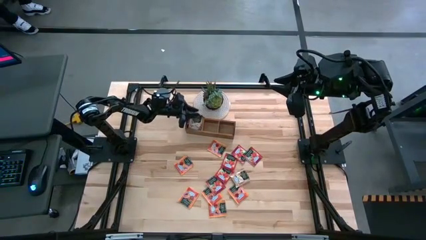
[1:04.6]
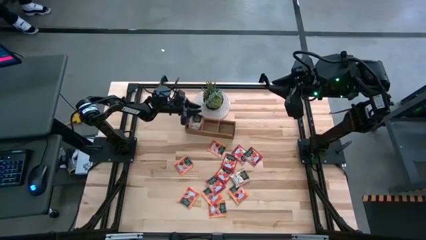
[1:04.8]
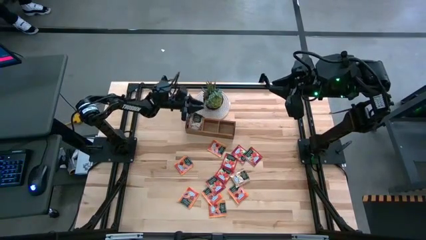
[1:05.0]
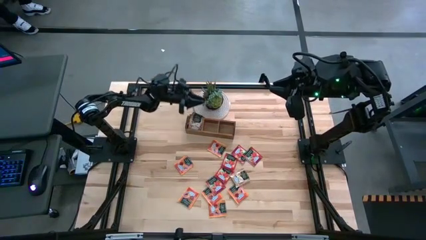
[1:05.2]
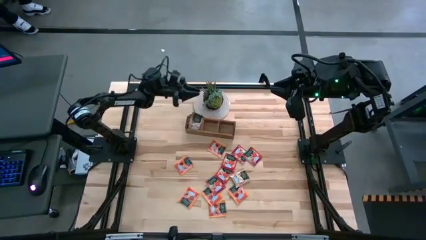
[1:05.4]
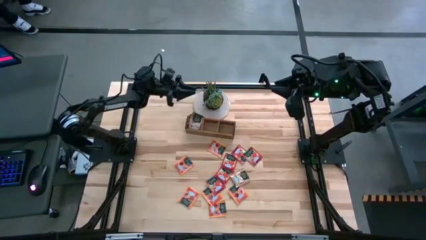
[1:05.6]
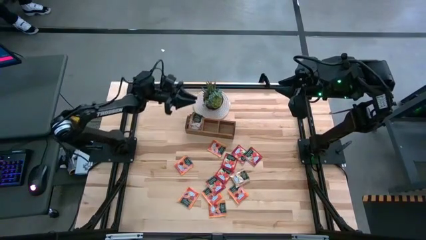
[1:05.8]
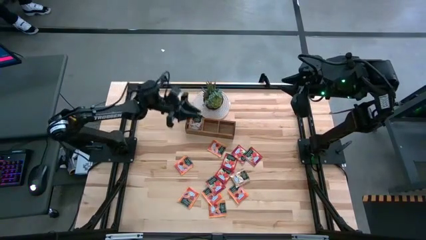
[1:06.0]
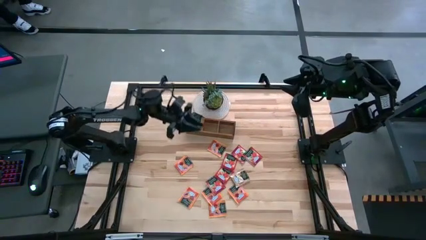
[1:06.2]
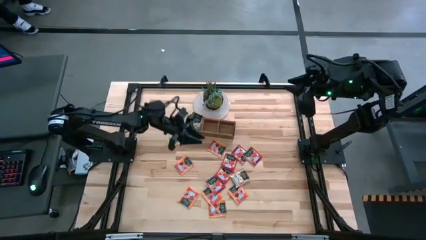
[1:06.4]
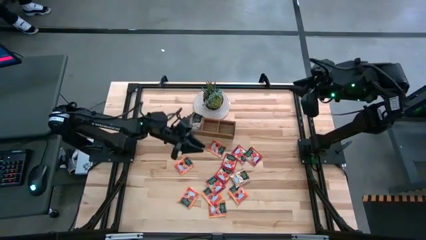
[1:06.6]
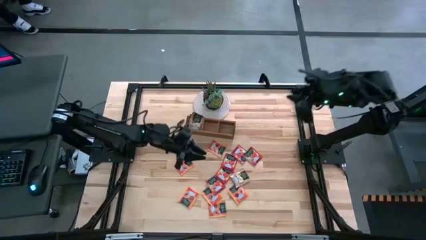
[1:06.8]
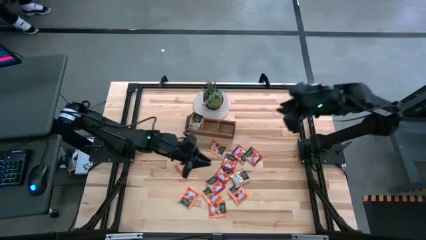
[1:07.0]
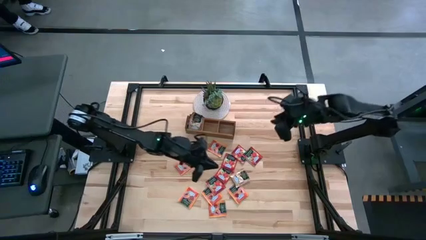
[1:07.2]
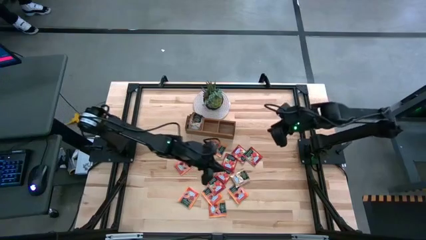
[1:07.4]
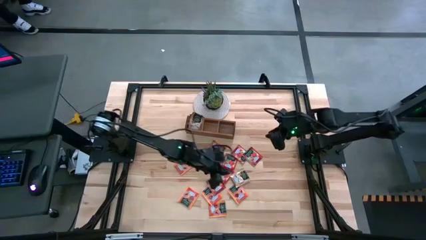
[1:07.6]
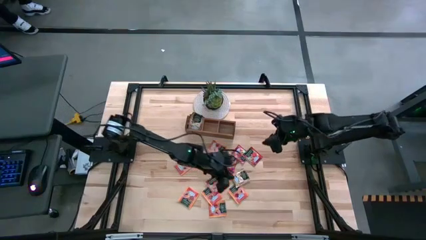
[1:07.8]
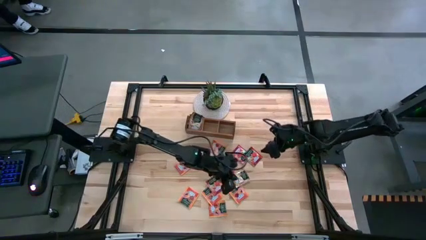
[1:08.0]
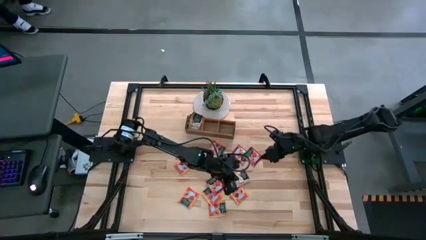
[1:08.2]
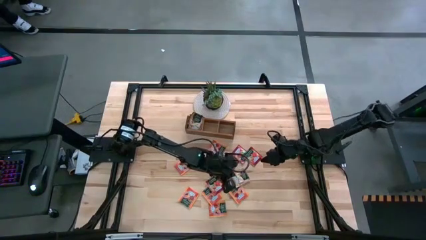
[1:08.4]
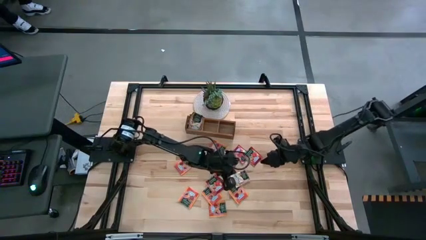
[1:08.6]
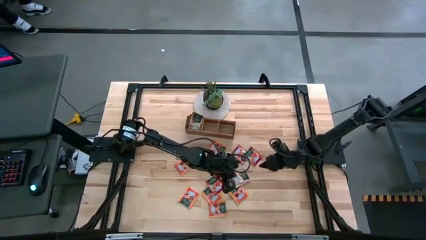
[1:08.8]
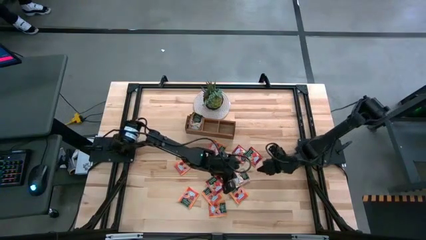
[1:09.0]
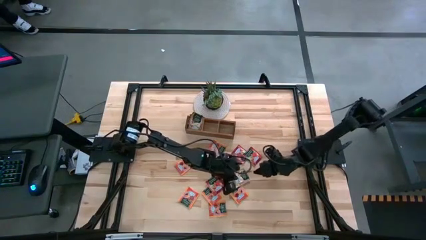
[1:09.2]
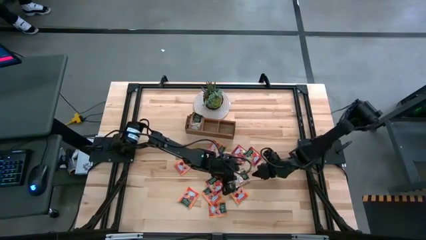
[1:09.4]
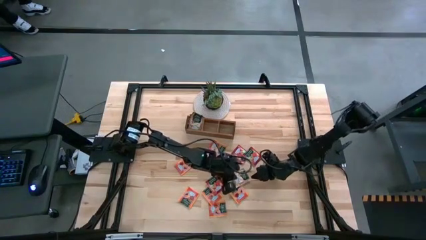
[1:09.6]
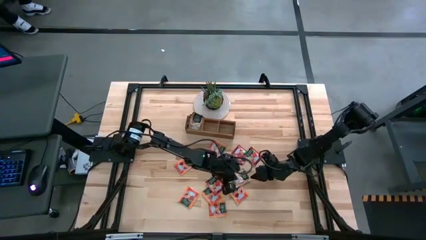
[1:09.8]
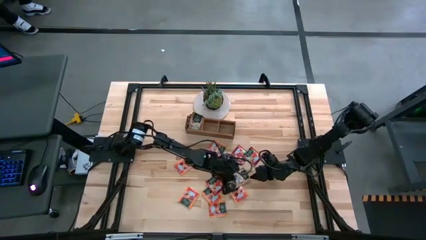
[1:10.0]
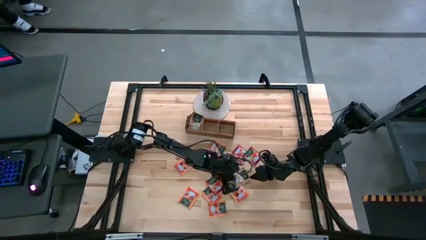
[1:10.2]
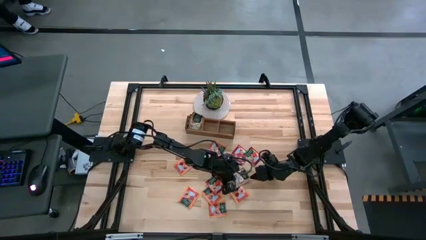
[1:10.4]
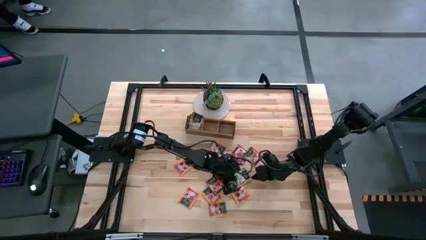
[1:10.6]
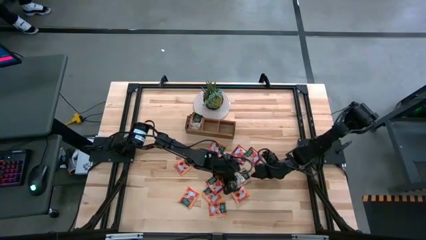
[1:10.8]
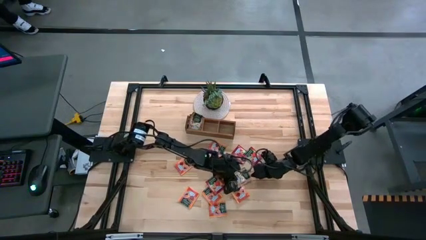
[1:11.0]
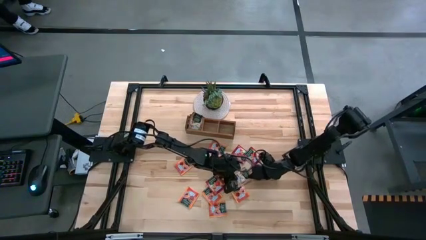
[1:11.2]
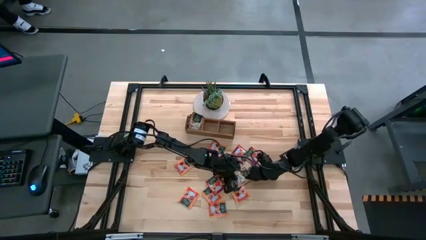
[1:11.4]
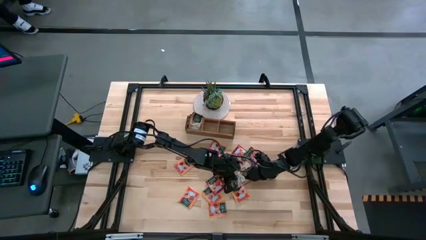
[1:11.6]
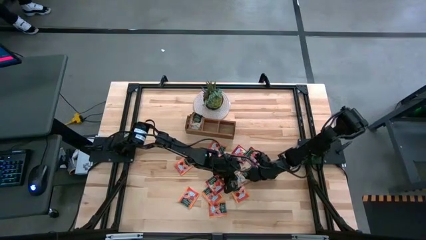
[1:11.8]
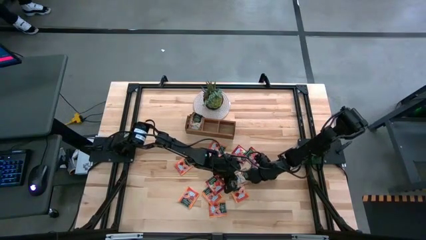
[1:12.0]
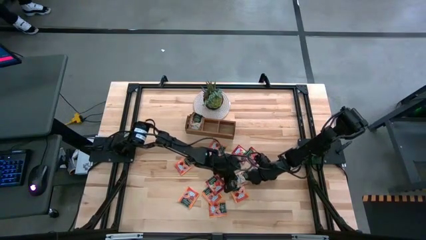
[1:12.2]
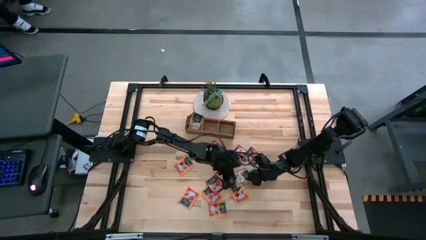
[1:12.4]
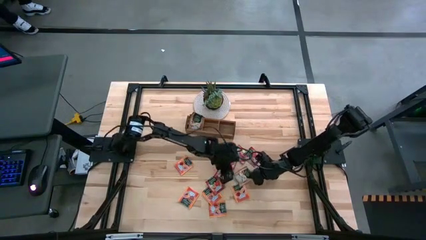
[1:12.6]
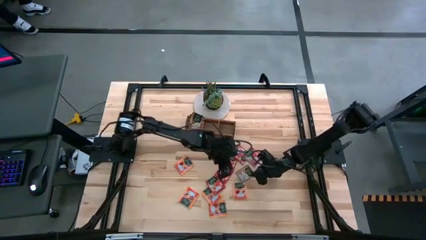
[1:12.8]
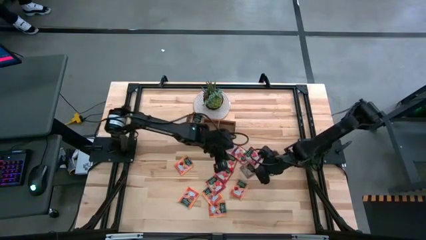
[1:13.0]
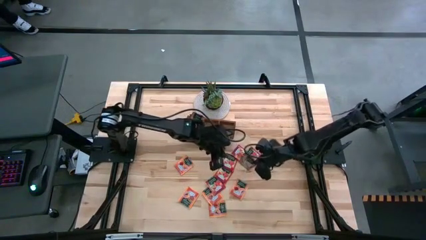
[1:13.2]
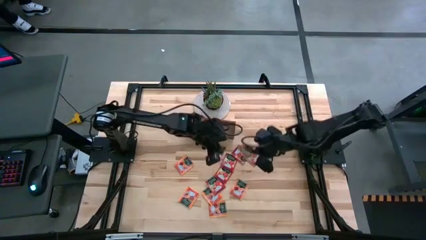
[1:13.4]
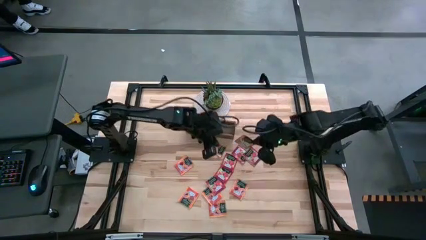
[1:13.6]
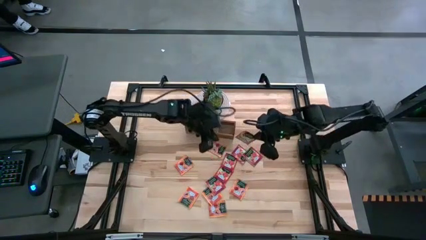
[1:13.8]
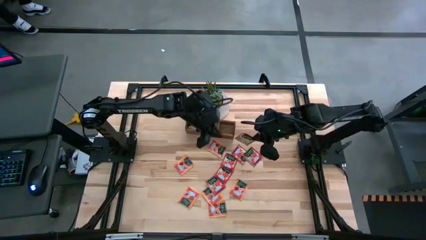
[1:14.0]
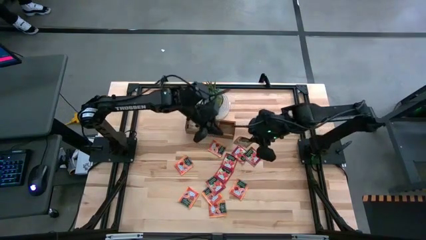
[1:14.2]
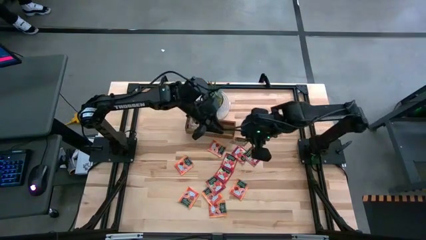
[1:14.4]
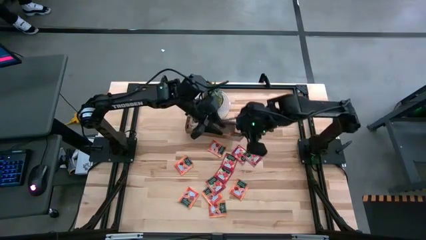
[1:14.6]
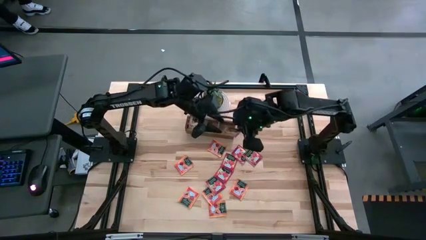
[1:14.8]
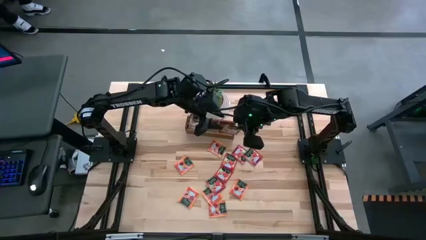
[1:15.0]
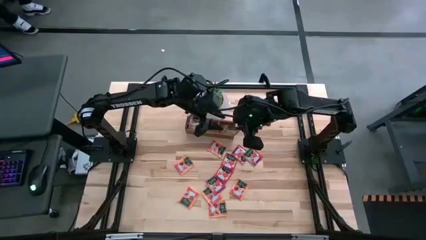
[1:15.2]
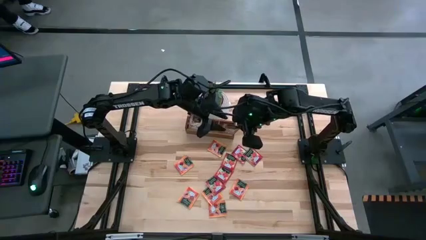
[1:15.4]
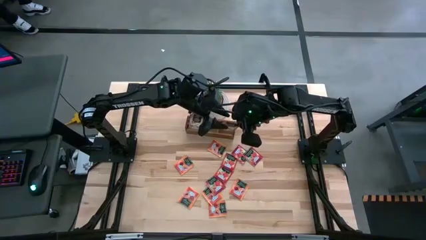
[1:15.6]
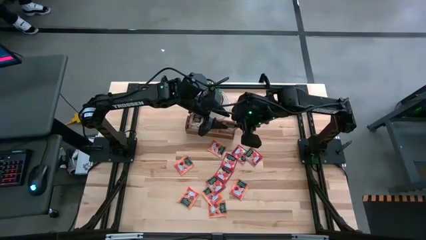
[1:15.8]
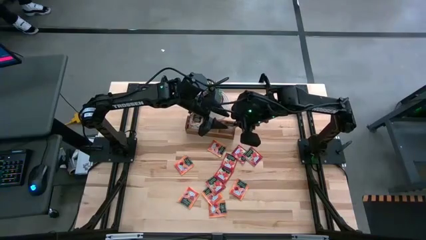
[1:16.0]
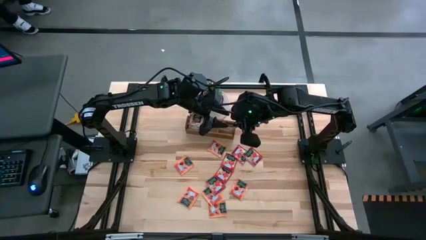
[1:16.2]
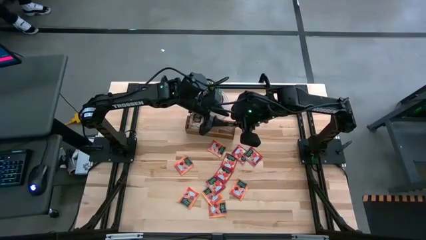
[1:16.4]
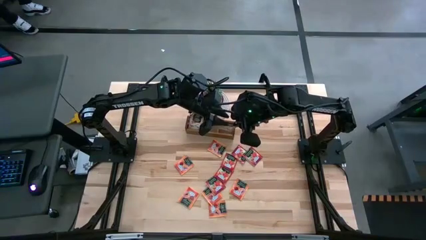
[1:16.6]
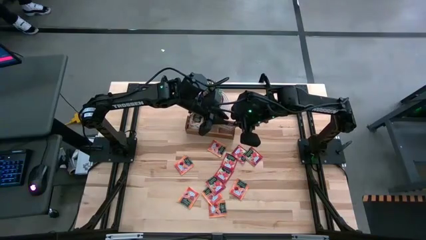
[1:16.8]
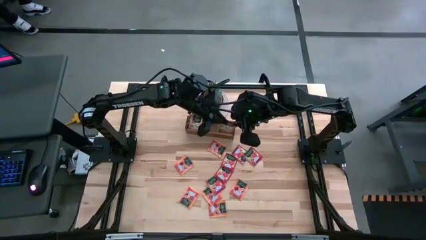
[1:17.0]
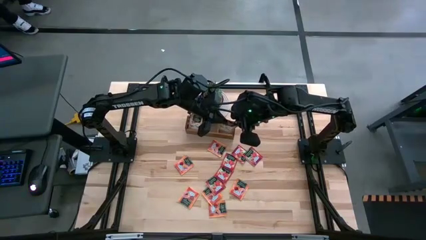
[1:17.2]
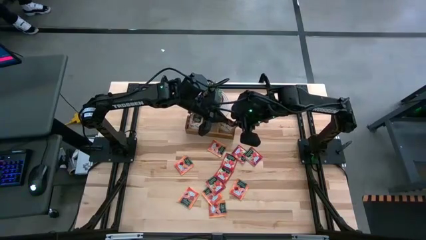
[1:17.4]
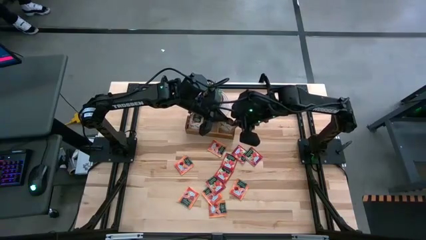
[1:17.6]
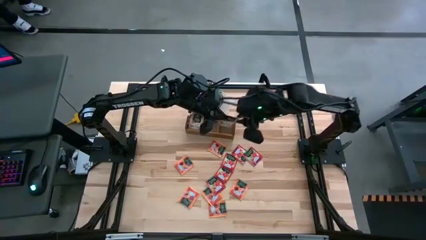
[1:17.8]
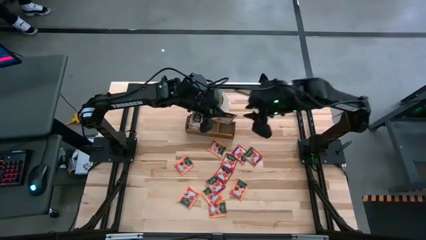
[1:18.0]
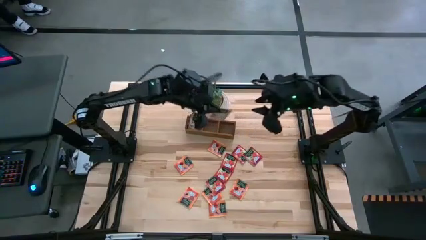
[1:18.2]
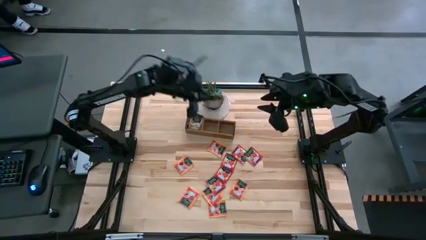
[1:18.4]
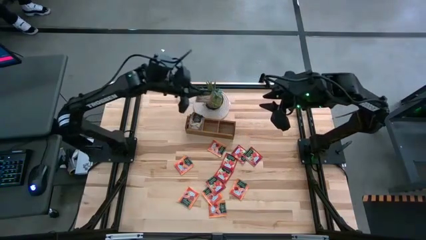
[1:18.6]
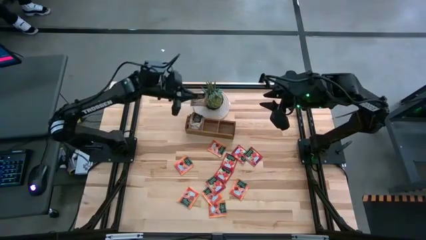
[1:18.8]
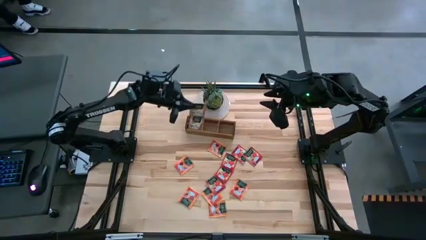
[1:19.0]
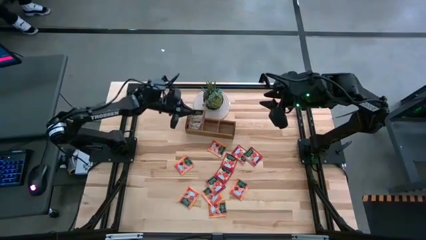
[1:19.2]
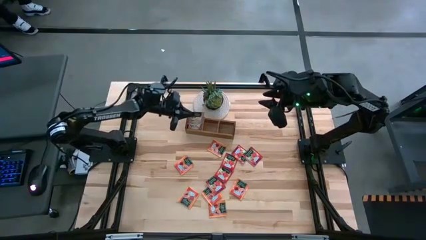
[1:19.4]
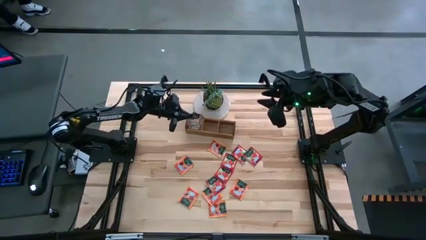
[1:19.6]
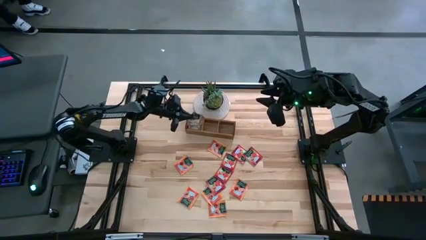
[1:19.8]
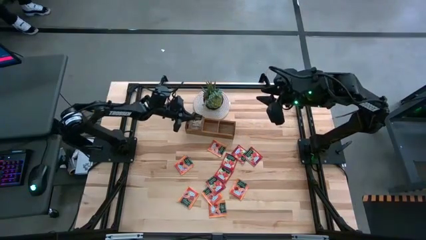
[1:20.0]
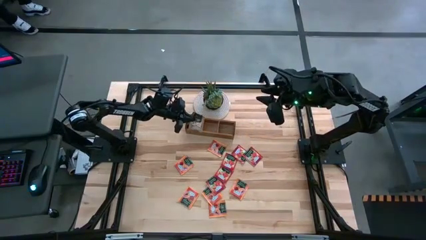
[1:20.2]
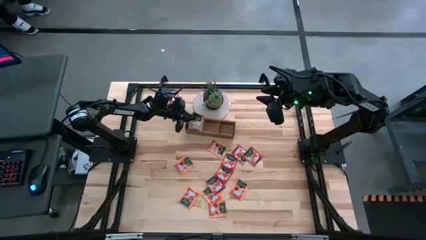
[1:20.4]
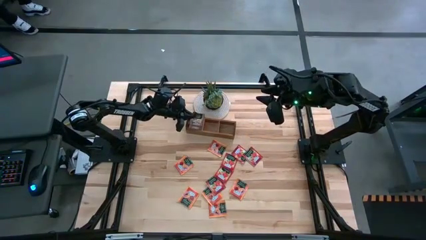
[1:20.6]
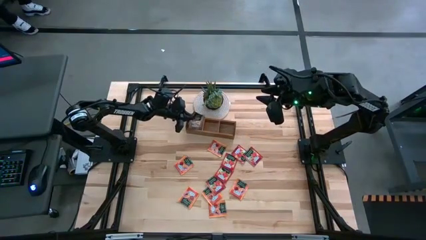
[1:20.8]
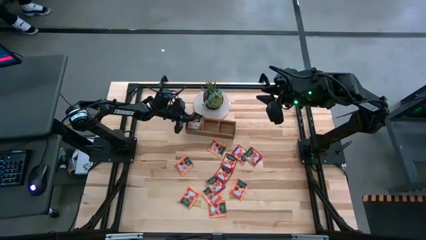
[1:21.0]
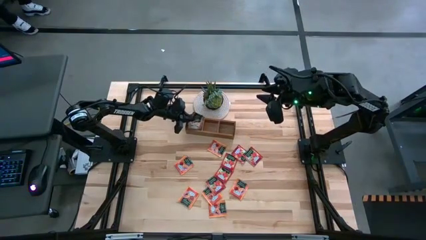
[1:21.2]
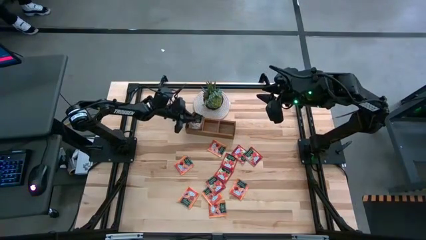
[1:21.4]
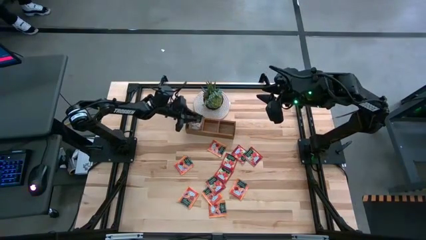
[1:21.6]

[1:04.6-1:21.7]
Task: Pick & Place Tea
Put the brown tea bag into the left section of the wooden organizer
